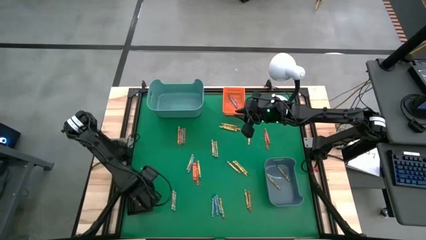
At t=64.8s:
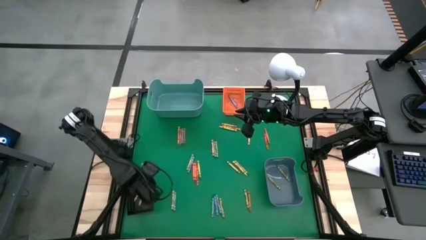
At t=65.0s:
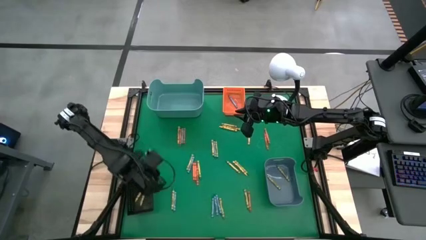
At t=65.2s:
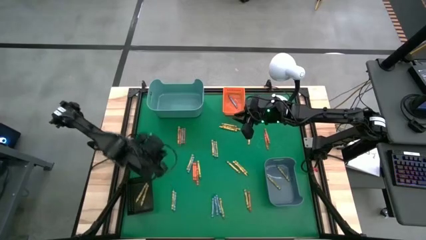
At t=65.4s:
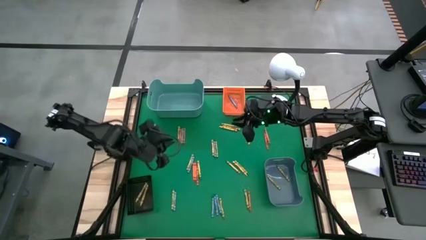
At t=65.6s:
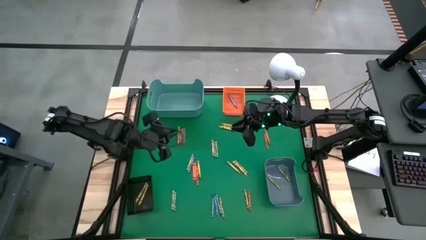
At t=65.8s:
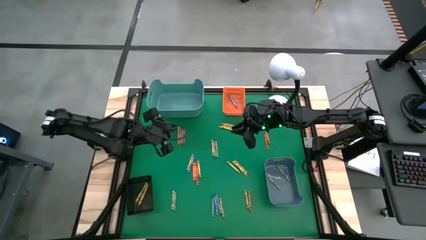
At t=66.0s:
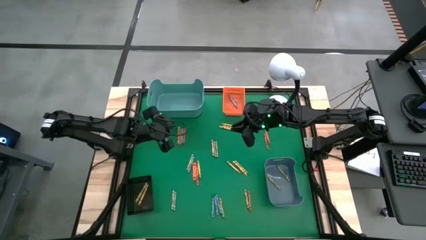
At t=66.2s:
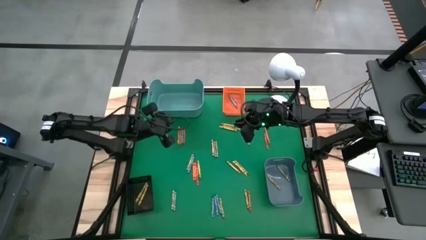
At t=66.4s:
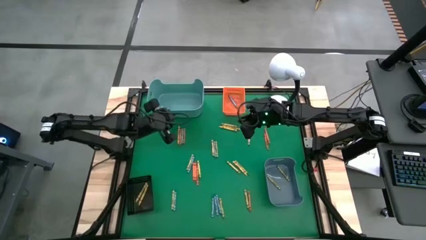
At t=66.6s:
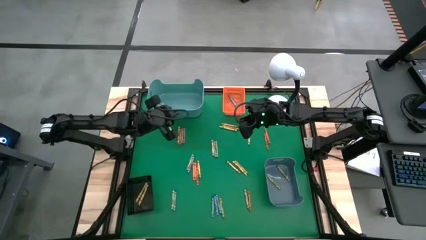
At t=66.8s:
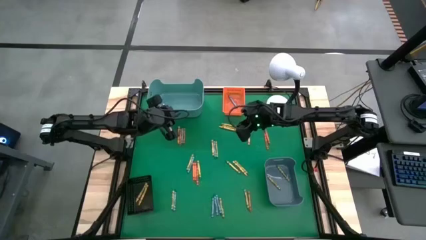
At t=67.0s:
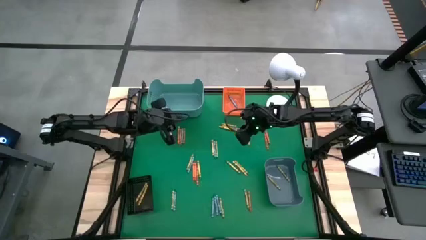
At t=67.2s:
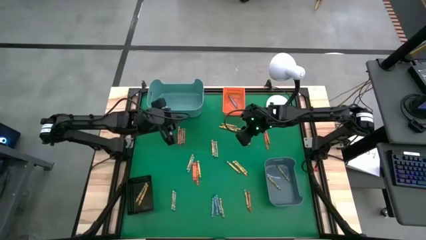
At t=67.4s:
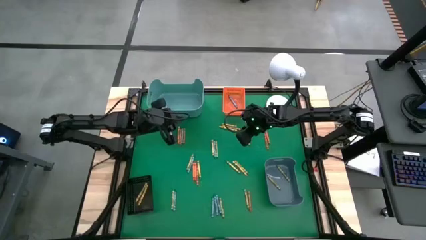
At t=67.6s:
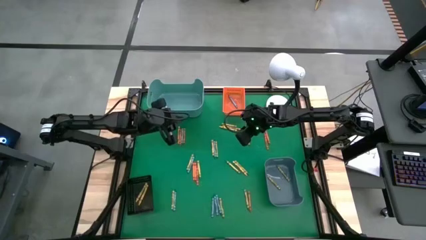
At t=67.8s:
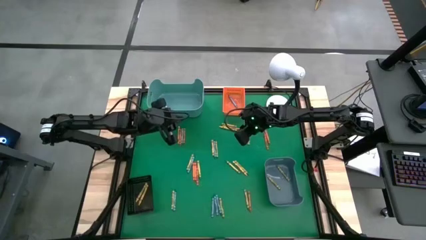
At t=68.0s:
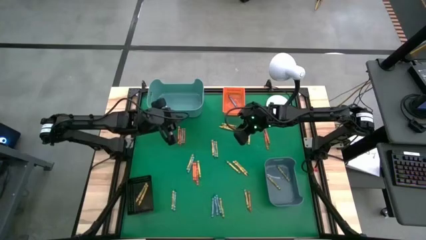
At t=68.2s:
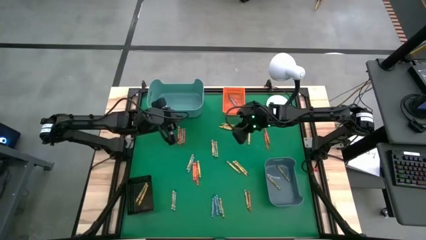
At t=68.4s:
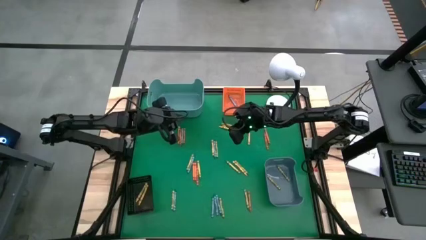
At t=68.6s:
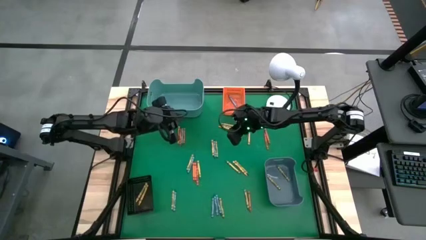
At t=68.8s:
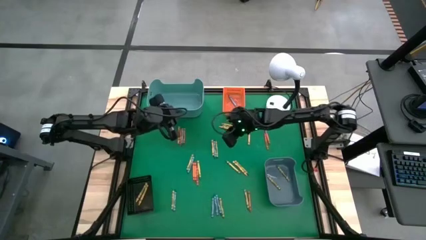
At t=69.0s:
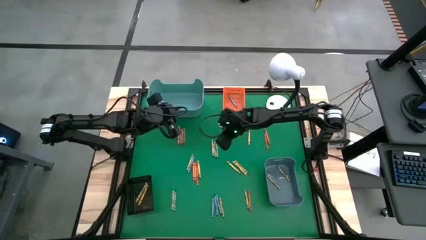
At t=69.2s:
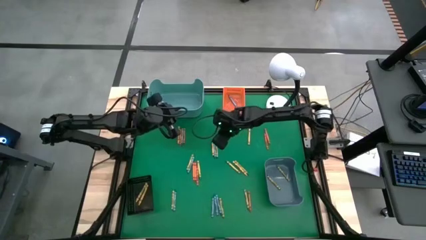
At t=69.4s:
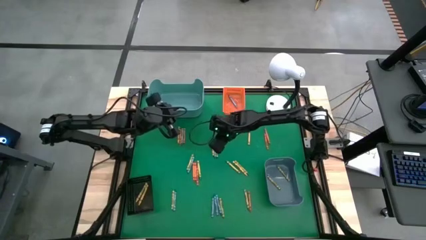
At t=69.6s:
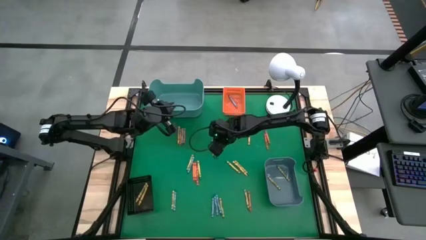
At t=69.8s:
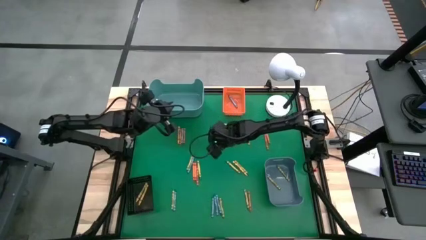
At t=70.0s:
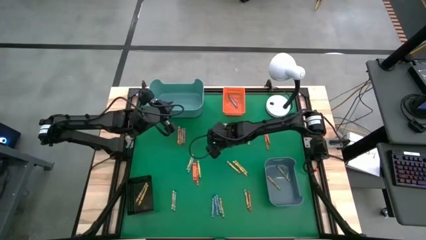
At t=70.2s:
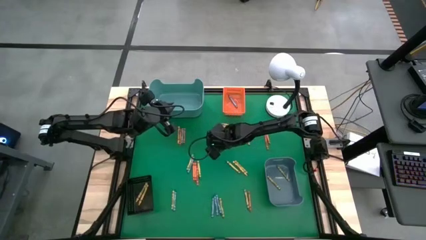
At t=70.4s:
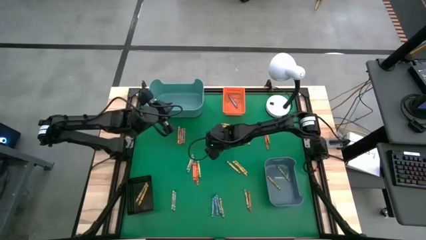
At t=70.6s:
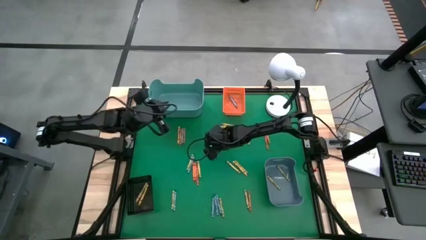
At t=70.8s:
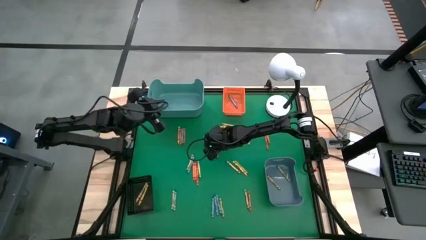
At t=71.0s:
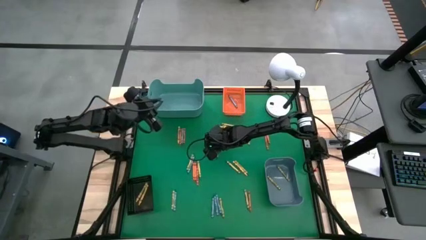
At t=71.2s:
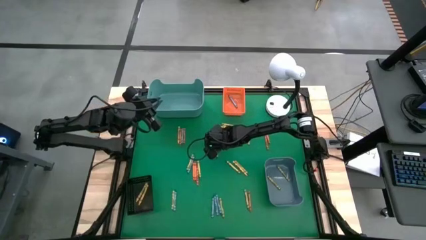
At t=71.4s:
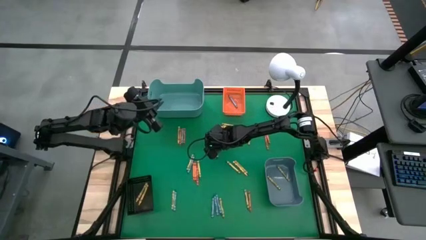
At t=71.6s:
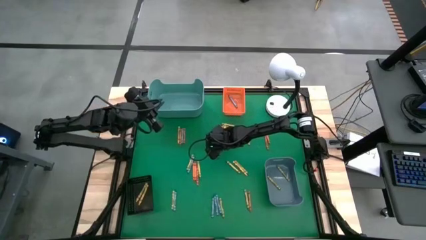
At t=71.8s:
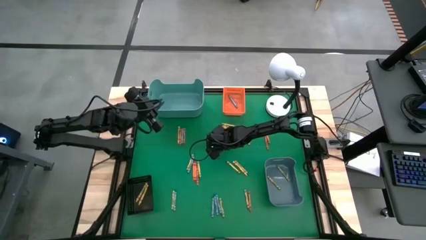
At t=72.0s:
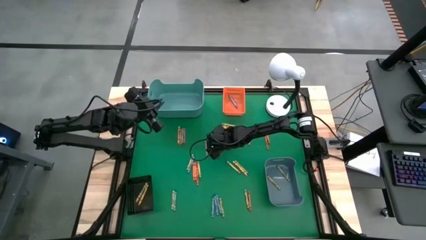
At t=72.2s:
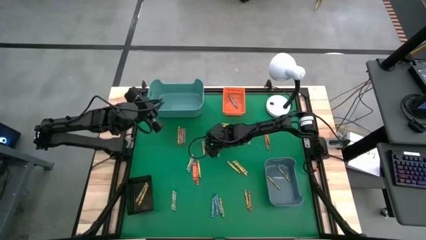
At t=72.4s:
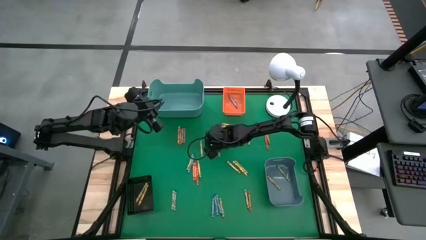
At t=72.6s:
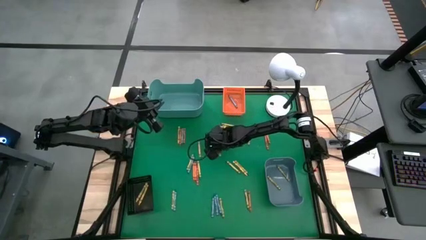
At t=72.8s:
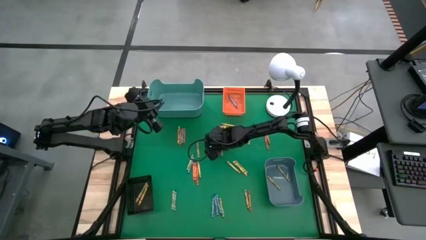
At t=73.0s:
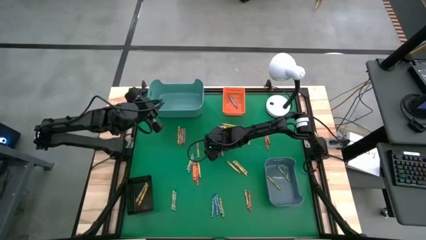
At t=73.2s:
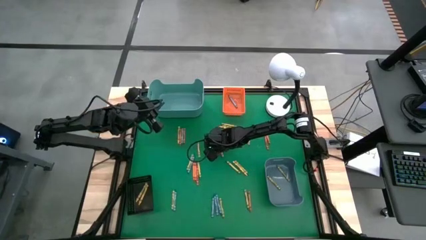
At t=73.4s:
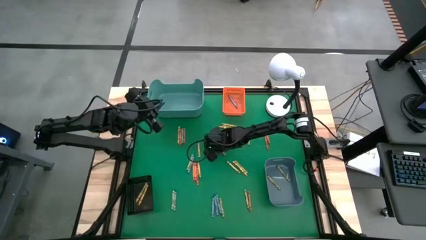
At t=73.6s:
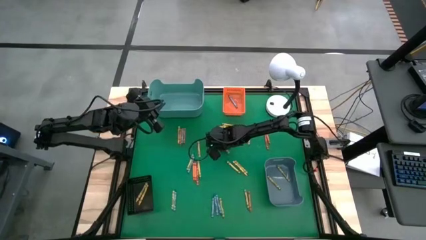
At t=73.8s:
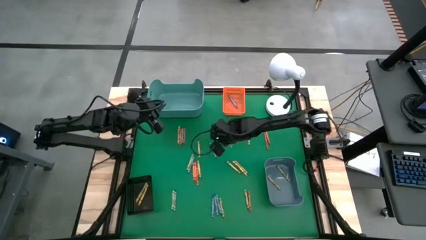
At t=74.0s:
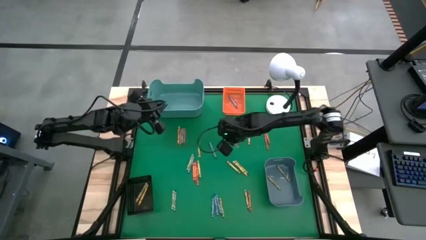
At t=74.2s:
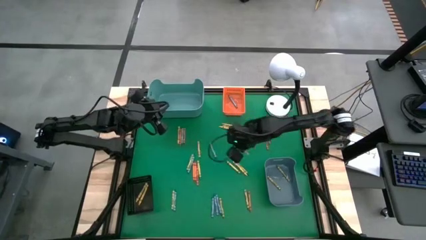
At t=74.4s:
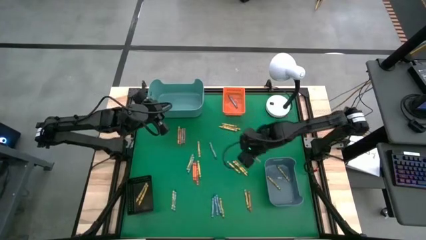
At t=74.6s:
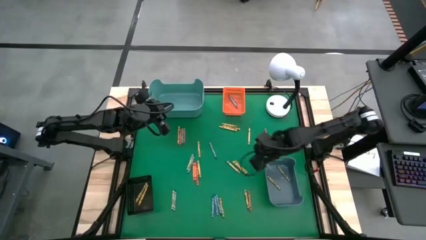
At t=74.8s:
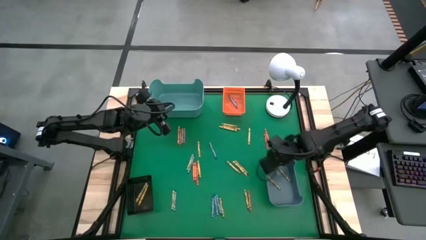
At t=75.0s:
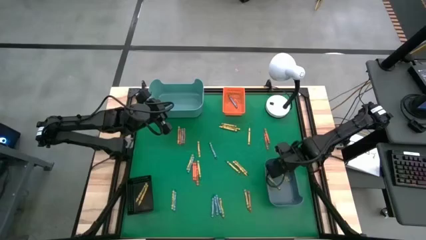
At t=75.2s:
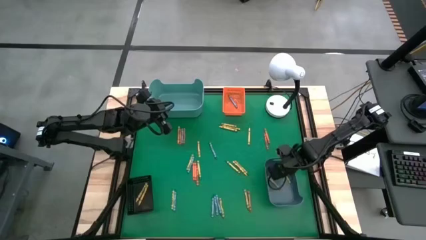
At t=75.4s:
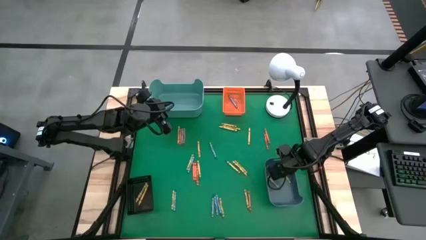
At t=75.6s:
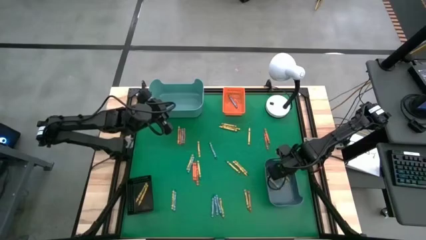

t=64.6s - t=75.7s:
Task: Sort crayons
Put the green crayon into the blue bin

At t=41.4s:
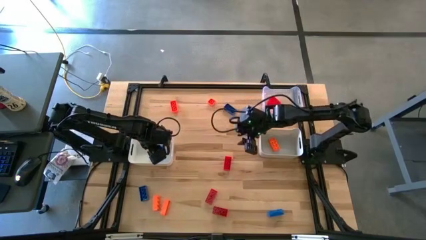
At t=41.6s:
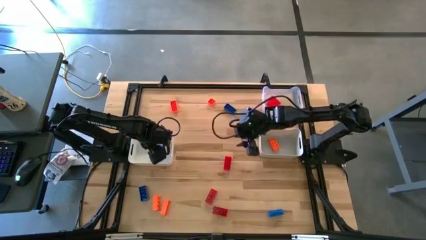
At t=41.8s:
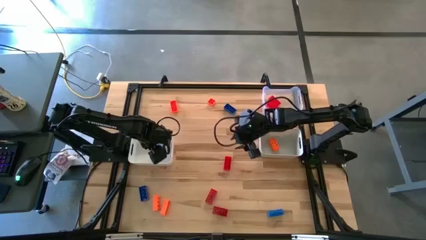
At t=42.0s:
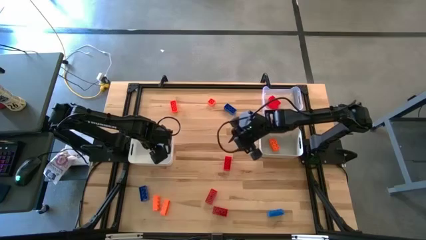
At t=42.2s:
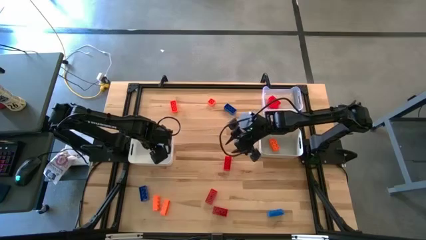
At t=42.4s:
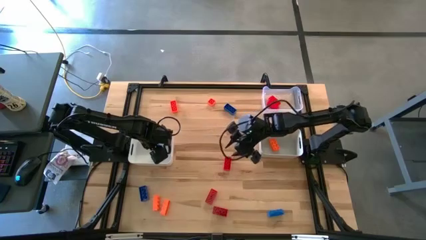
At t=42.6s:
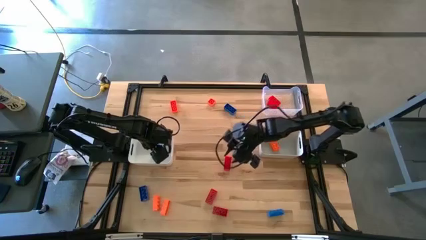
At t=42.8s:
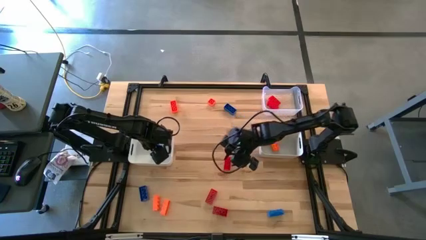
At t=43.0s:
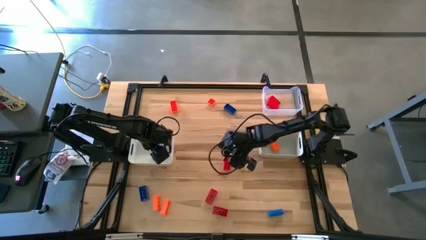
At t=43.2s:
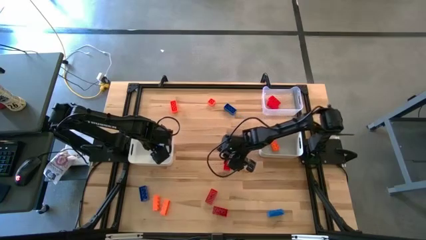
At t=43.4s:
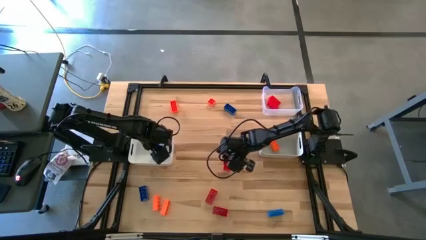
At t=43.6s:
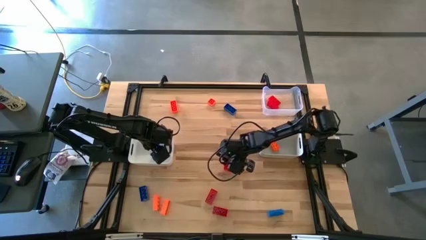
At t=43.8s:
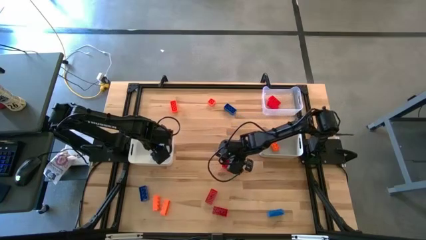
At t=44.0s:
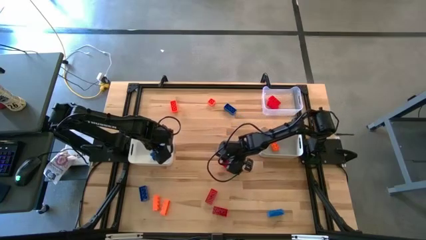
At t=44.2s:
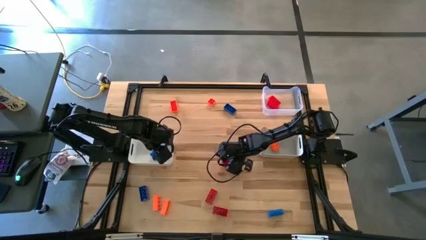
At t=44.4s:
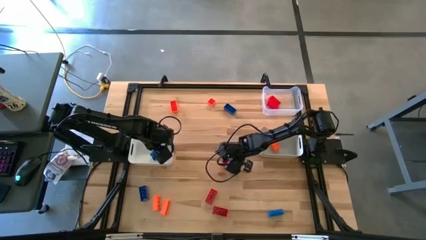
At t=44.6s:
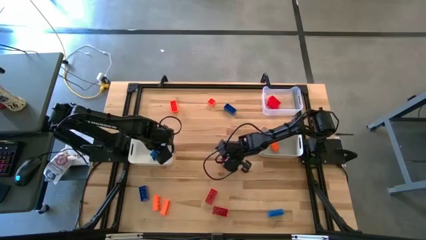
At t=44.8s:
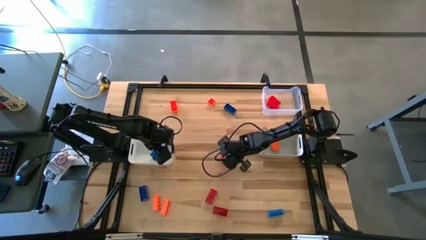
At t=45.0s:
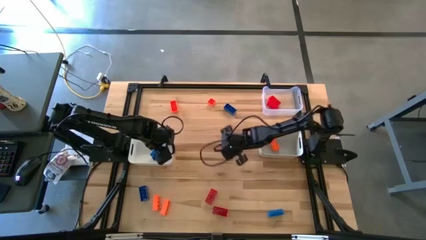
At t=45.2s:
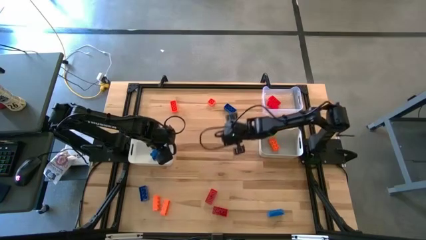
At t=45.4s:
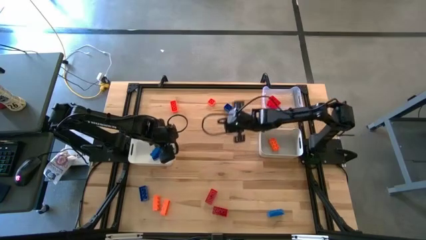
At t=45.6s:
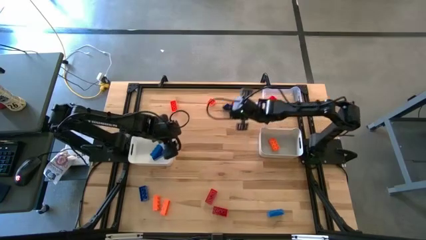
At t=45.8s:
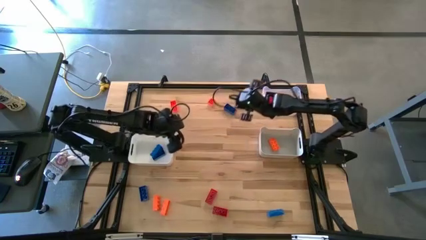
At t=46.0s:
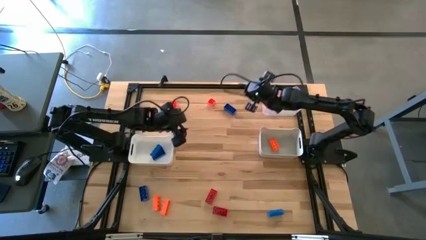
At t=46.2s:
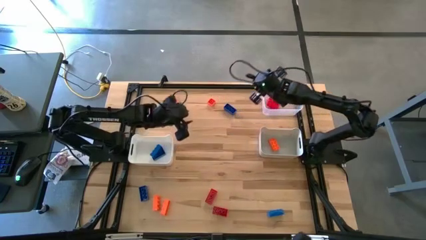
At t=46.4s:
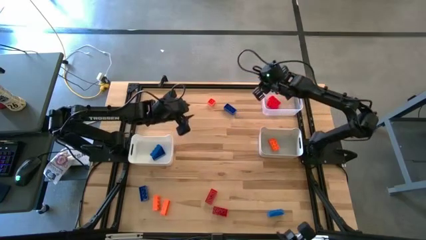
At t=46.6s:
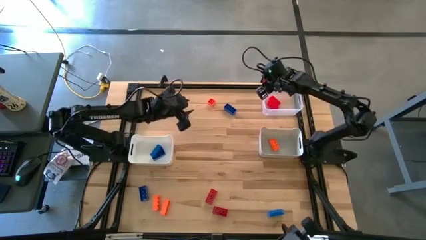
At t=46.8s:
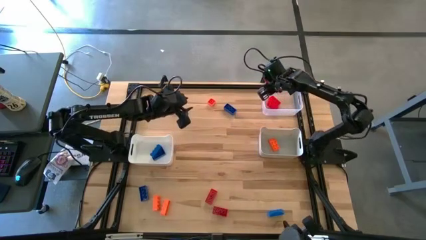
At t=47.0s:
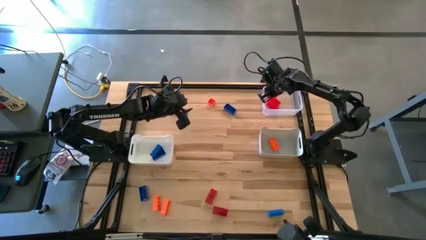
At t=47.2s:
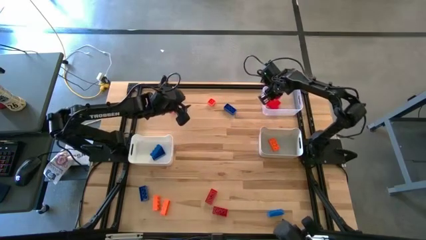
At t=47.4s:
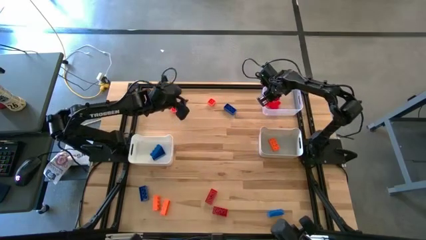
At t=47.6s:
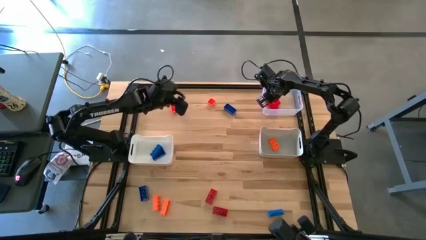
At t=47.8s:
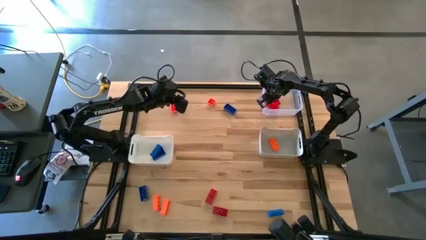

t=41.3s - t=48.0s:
Task: Sort & place blocks by color
Put the red game piece into the transparent bin
